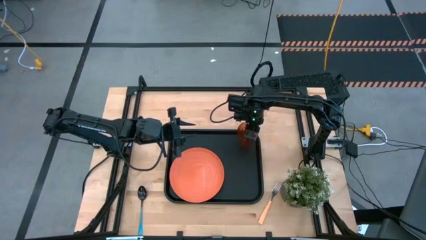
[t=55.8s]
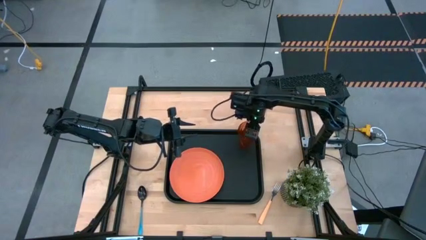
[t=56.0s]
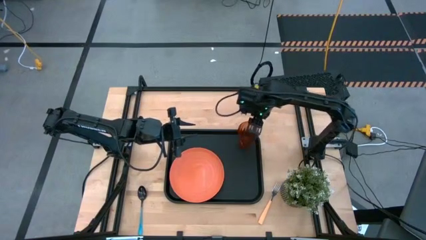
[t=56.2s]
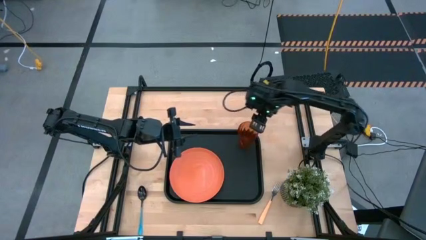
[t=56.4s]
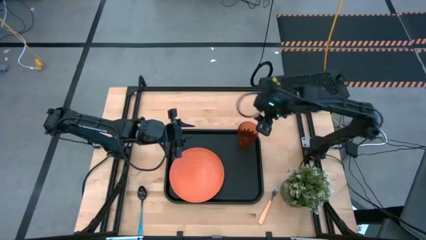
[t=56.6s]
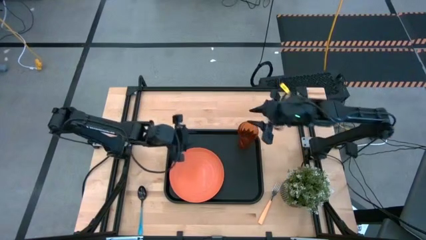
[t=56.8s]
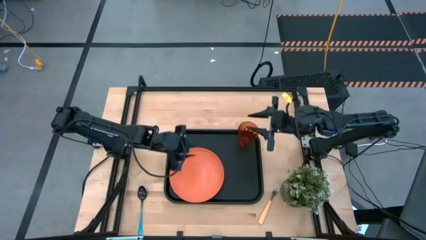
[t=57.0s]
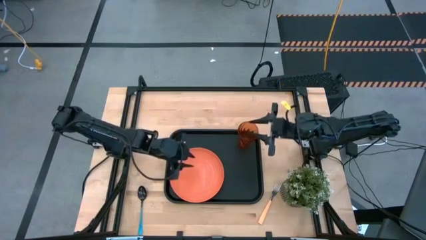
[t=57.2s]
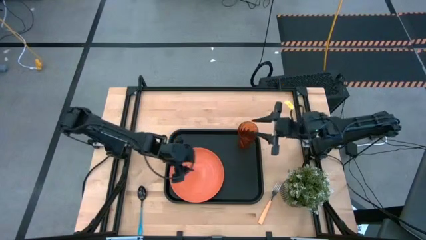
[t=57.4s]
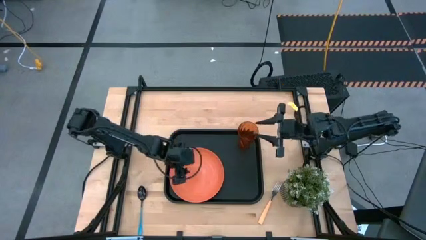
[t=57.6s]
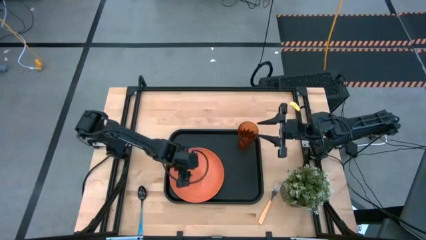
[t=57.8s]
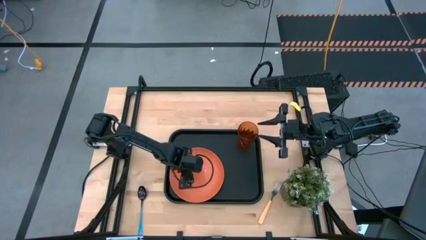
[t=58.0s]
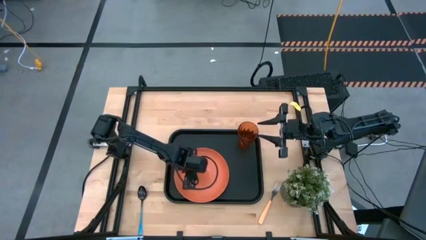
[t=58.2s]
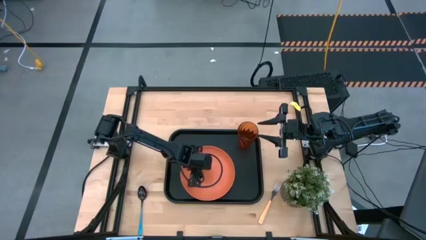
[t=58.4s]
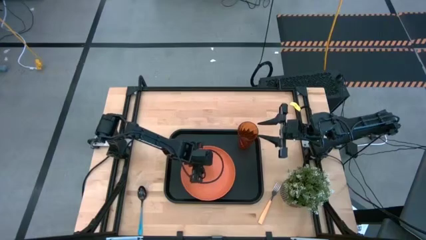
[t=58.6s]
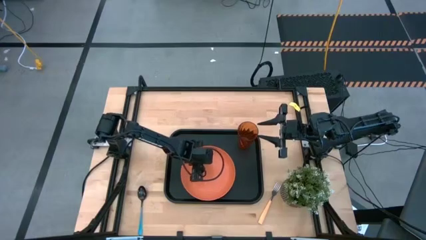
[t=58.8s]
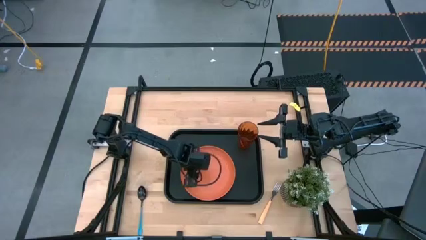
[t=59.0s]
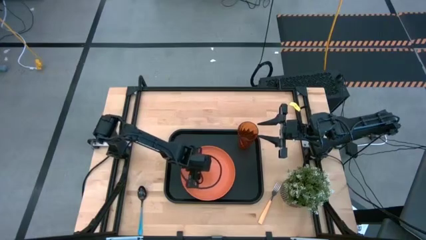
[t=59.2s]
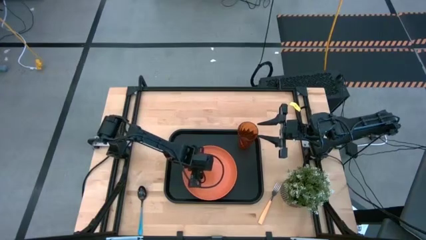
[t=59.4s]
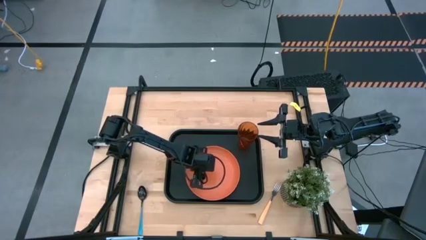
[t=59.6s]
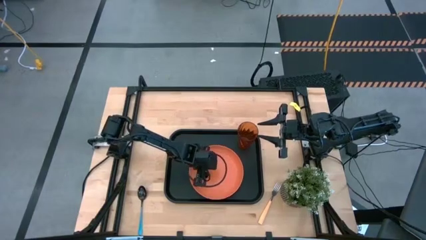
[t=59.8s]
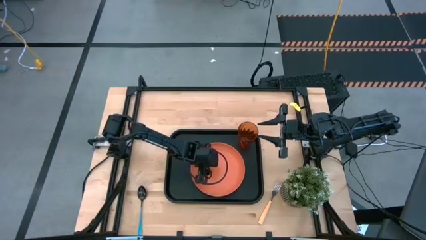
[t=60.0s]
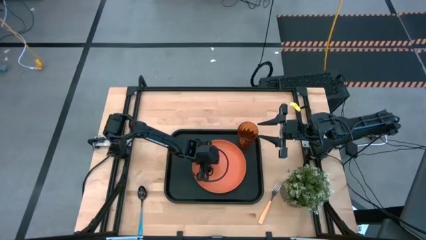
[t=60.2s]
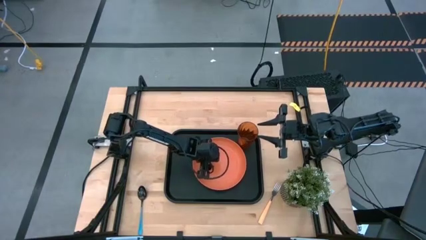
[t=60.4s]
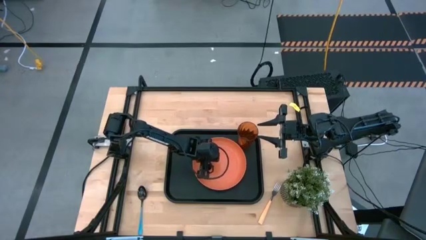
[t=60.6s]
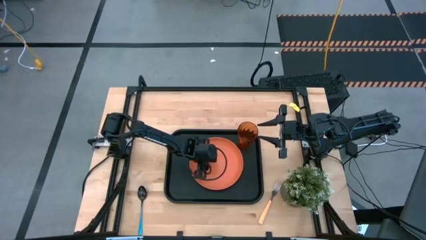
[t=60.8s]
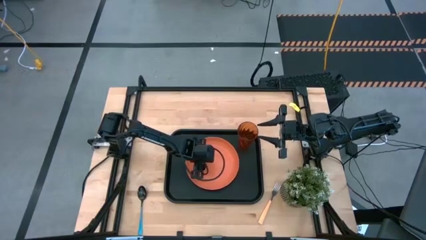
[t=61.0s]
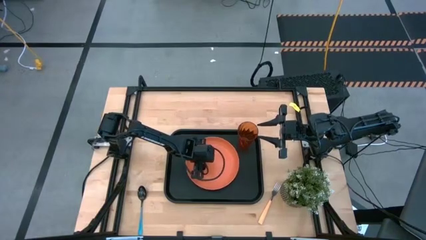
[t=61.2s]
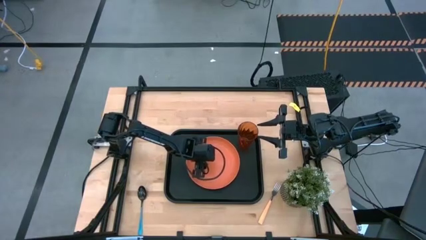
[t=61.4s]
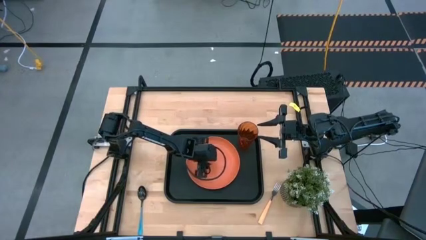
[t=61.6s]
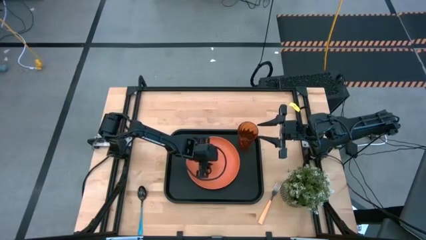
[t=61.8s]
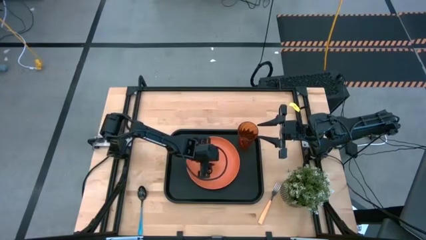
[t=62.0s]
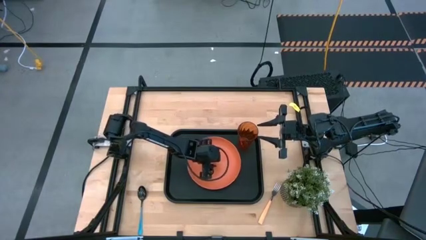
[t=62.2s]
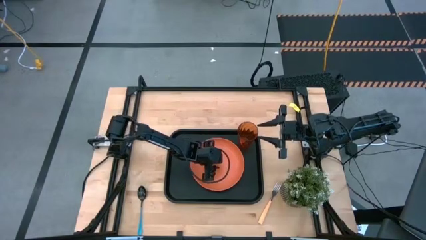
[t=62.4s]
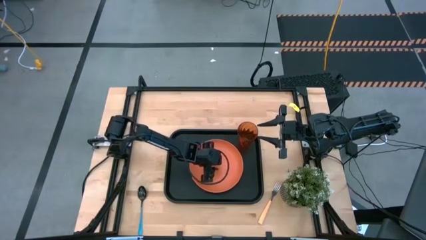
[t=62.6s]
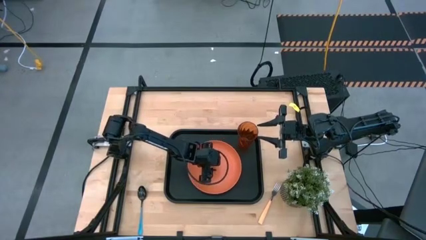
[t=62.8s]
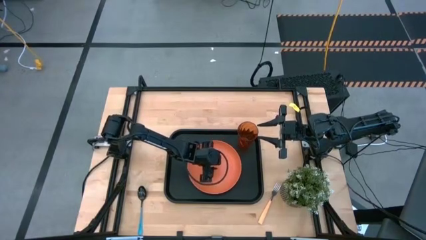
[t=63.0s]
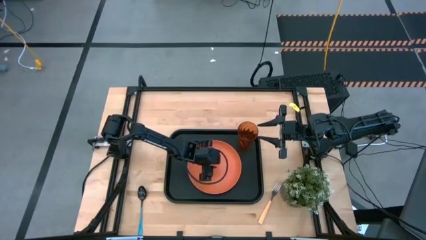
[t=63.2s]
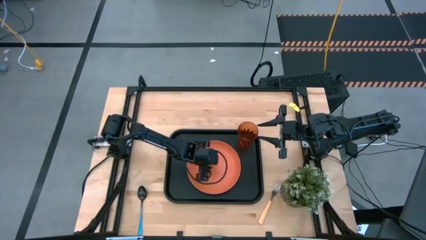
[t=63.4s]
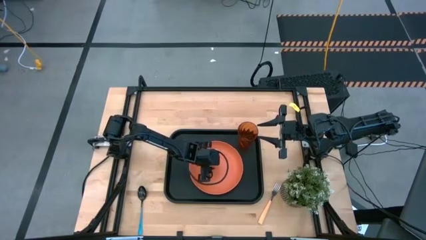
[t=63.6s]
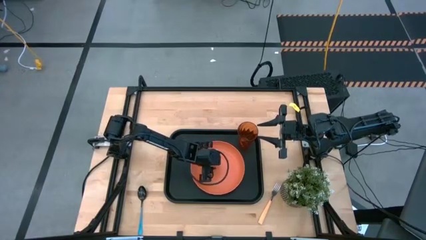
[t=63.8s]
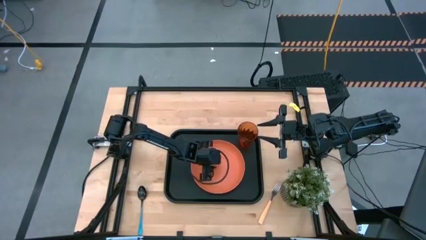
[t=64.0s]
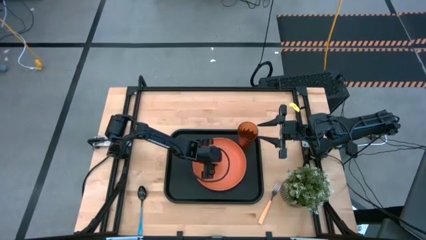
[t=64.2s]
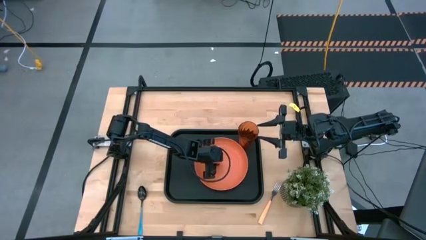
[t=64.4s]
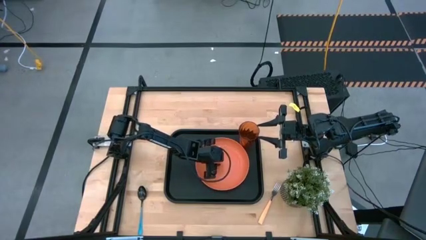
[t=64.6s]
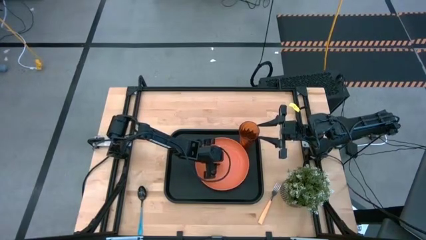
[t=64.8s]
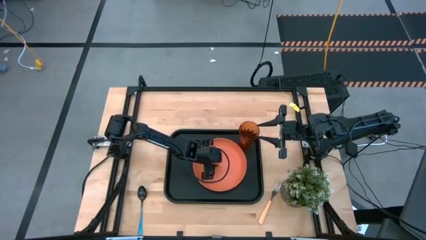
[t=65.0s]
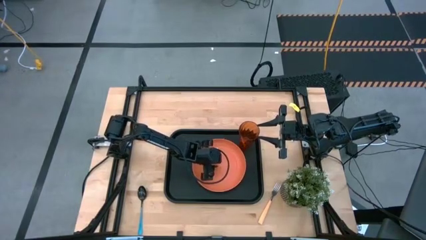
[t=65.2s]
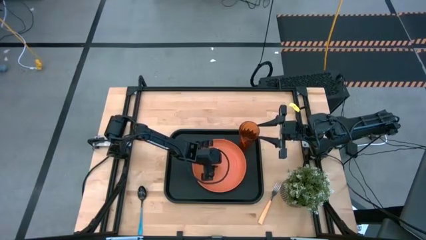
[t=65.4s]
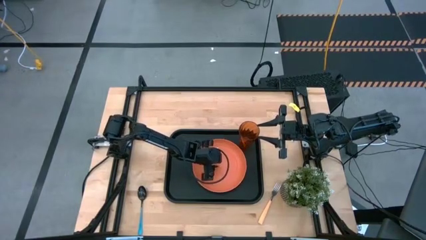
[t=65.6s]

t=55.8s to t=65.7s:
Task: Pick and place plate/cup/fork/spoon on tray
Adjust the pink plate on the black serving tray

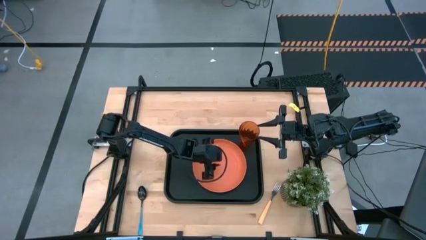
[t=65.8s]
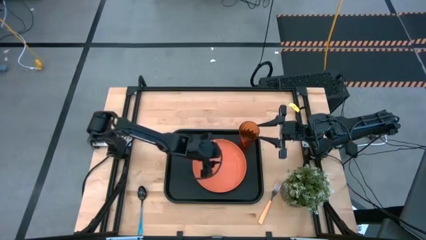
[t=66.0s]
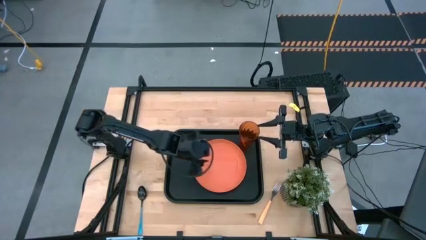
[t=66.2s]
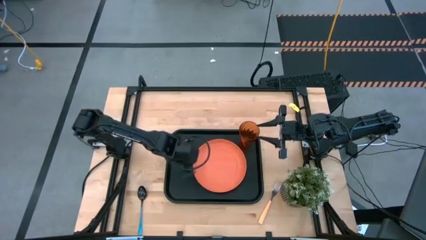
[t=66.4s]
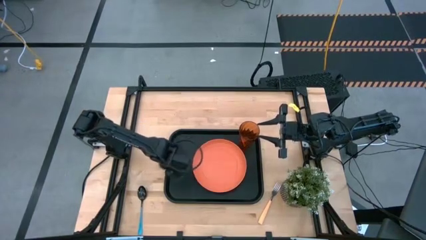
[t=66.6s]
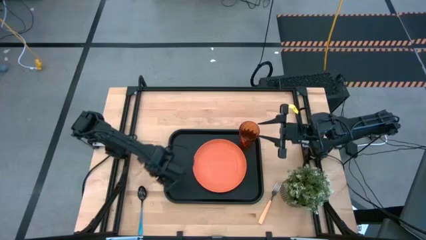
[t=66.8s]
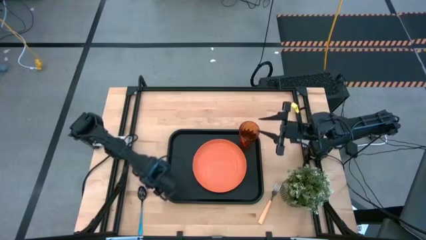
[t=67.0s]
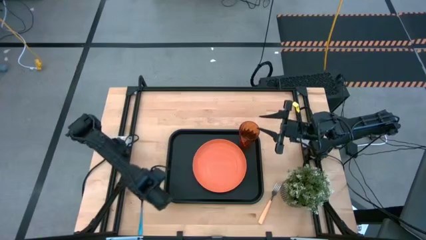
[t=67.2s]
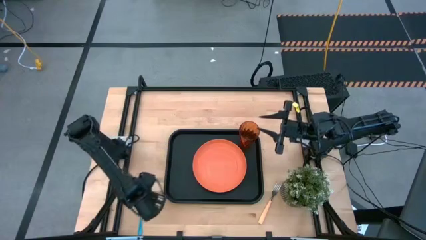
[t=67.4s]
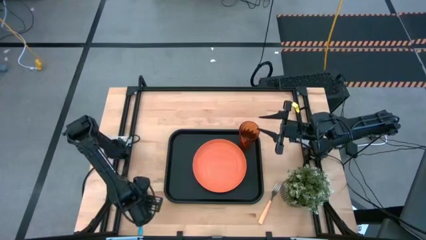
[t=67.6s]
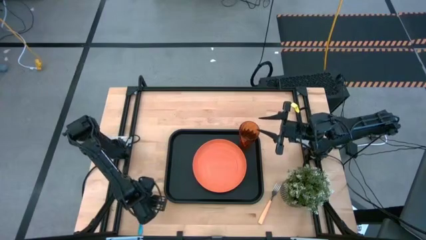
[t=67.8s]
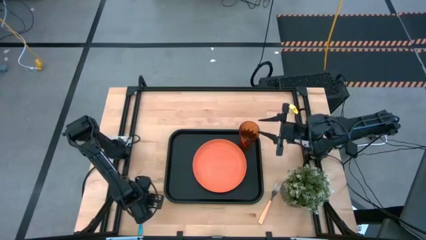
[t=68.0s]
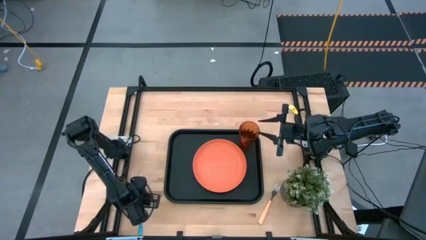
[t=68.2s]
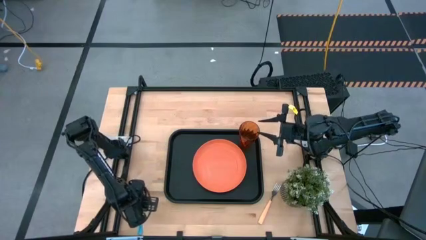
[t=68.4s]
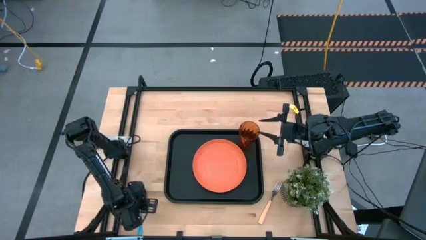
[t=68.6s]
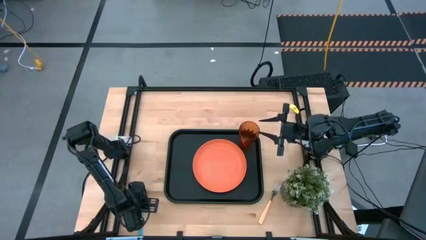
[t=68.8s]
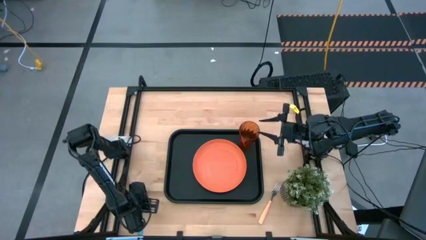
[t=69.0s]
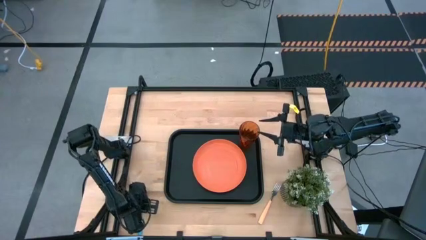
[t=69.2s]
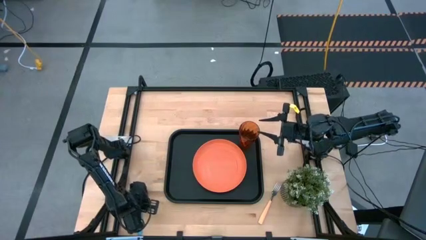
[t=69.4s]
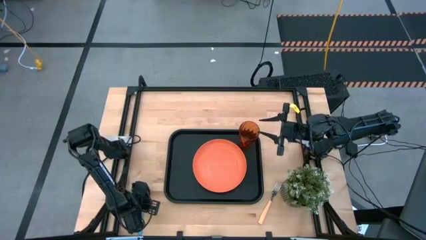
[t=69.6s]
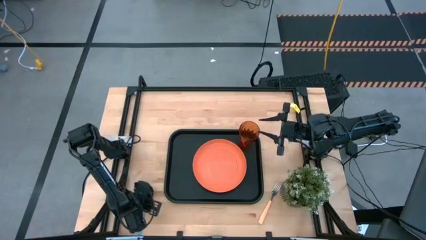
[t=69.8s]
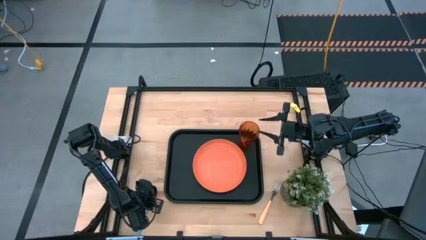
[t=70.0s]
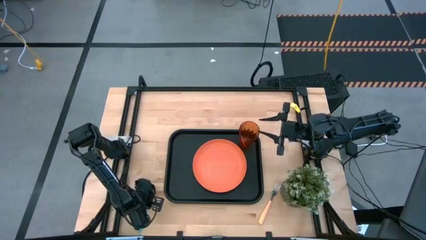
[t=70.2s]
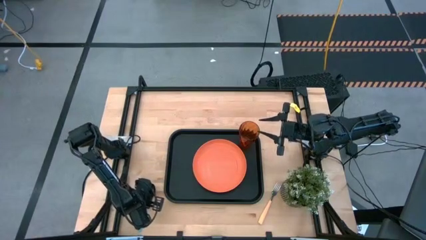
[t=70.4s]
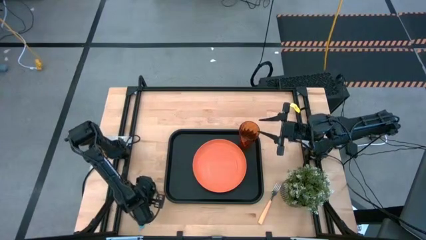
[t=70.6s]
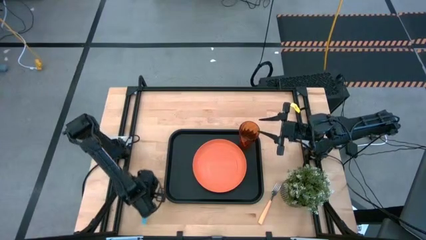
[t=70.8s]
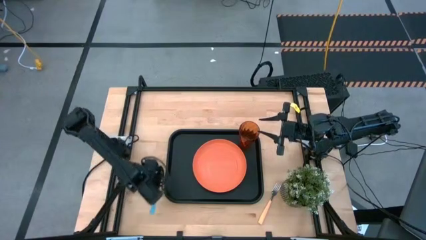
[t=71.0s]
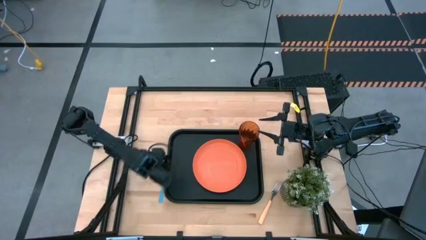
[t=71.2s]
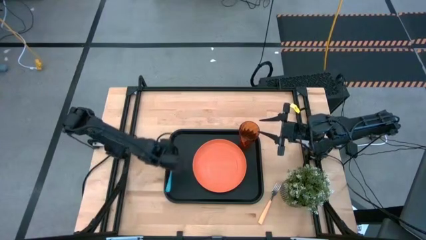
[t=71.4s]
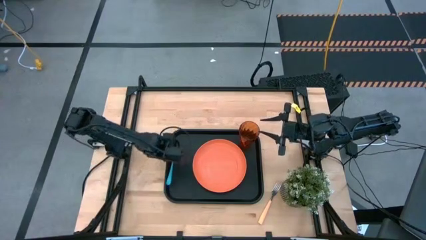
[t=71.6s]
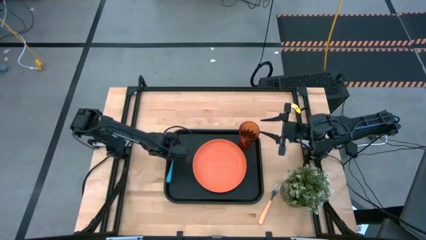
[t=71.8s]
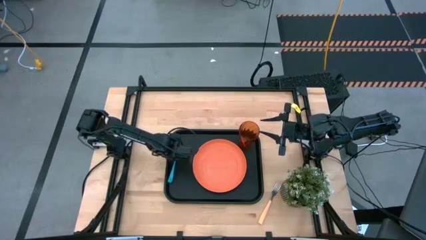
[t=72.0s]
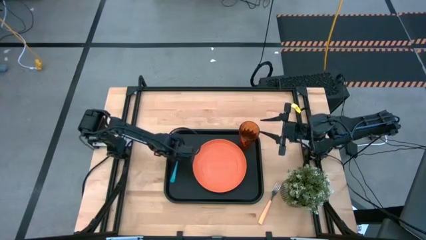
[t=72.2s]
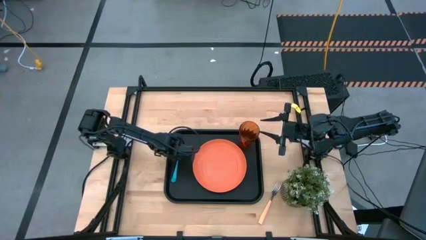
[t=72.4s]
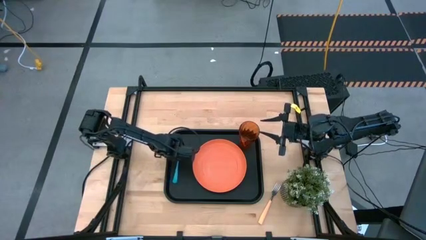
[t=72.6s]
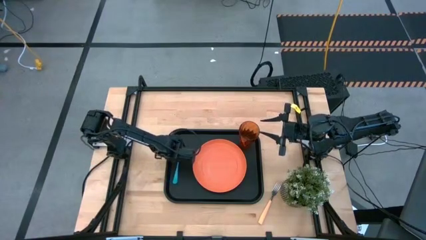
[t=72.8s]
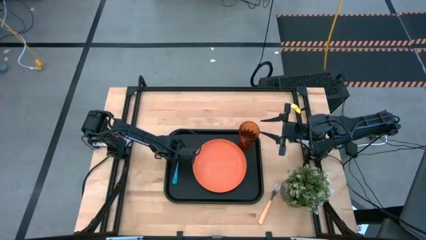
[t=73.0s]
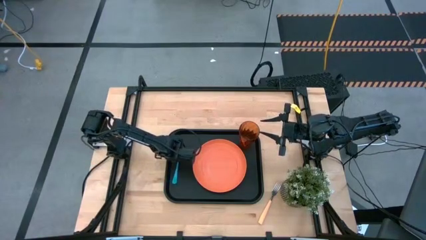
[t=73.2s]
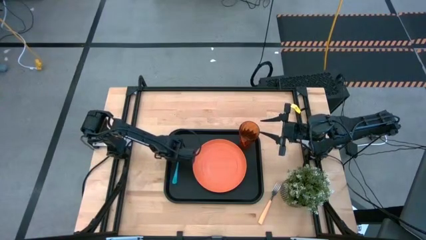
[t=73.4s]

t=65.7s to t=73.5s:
Put the blue spoon on the black serving tray
